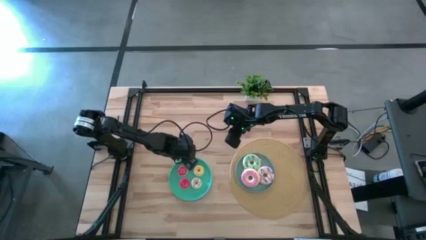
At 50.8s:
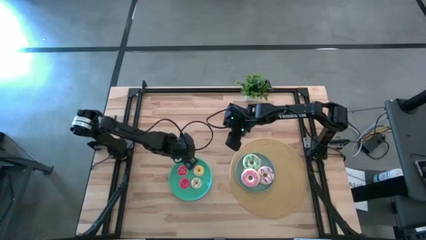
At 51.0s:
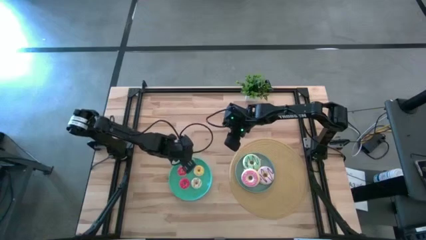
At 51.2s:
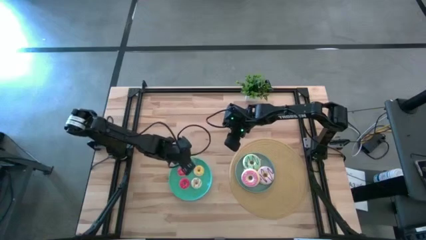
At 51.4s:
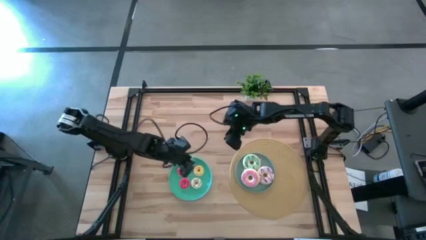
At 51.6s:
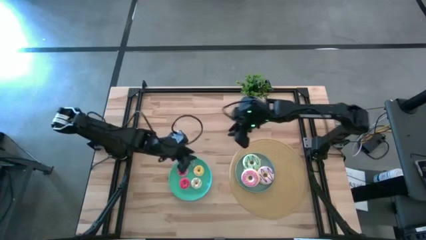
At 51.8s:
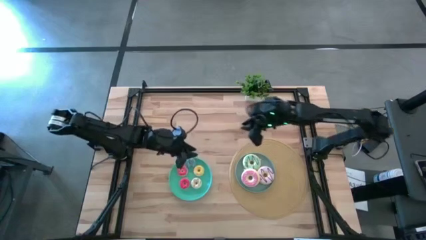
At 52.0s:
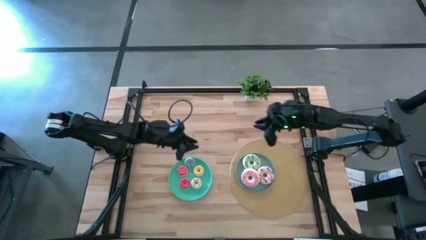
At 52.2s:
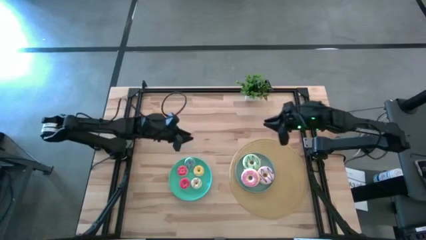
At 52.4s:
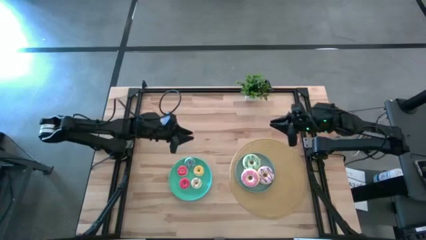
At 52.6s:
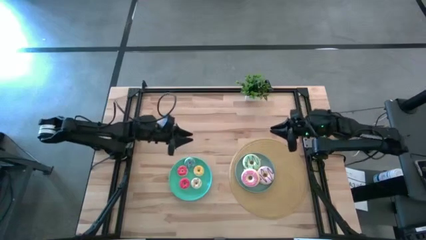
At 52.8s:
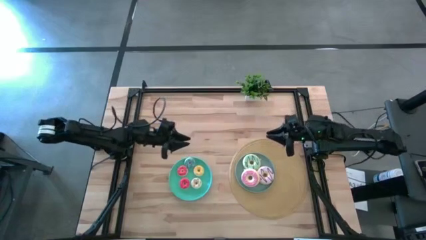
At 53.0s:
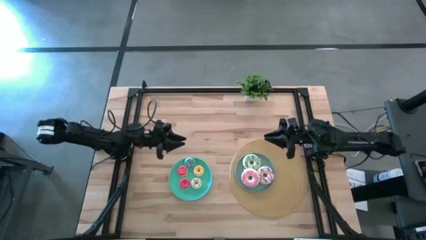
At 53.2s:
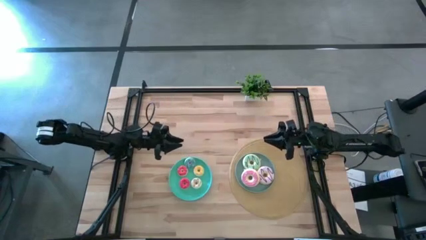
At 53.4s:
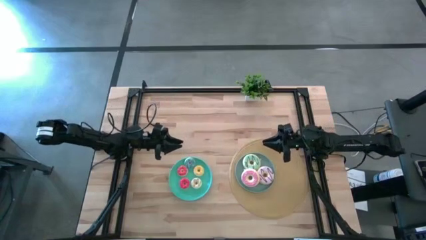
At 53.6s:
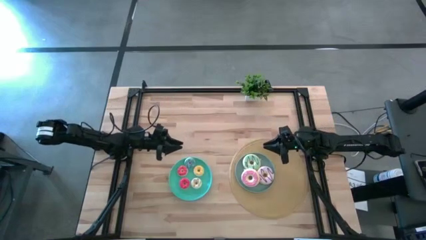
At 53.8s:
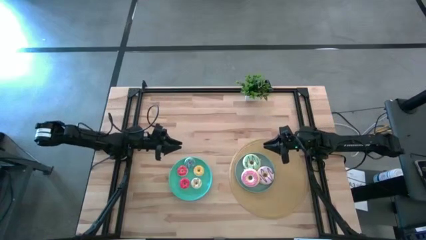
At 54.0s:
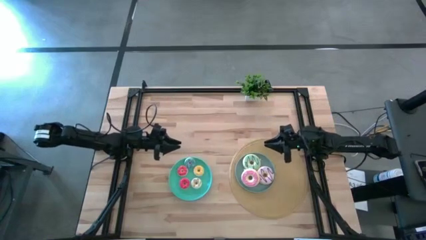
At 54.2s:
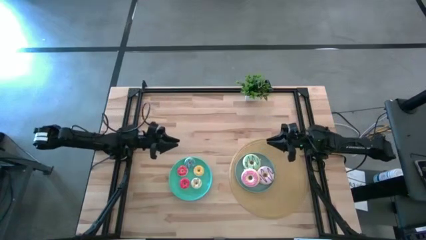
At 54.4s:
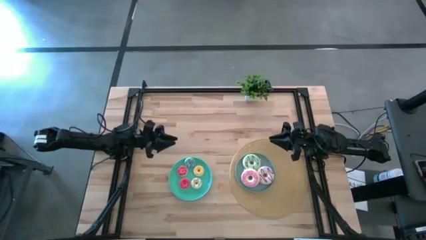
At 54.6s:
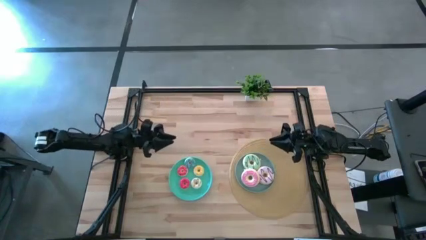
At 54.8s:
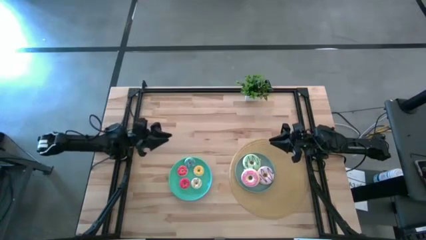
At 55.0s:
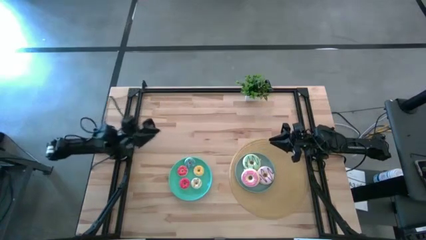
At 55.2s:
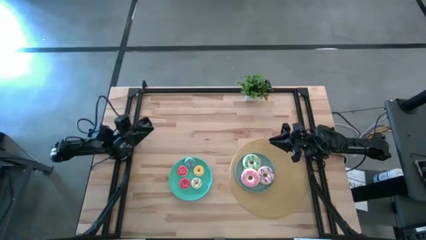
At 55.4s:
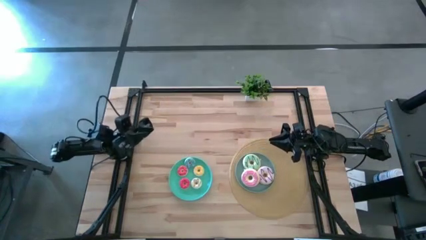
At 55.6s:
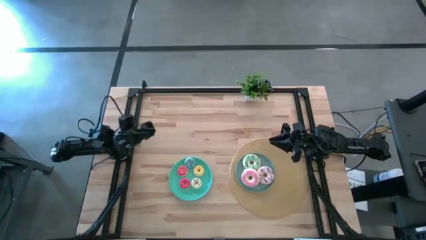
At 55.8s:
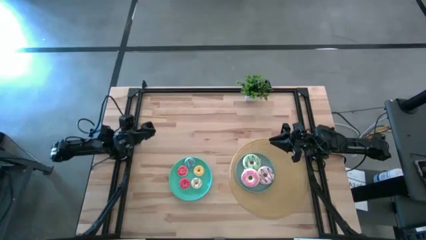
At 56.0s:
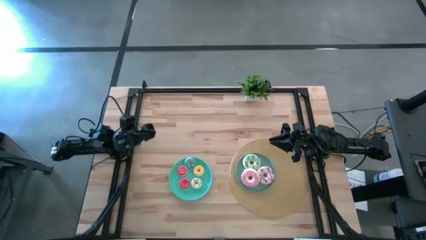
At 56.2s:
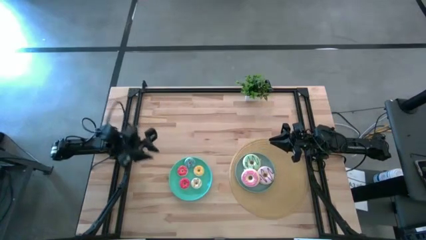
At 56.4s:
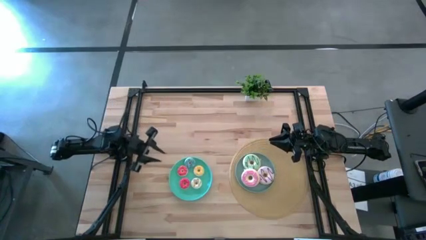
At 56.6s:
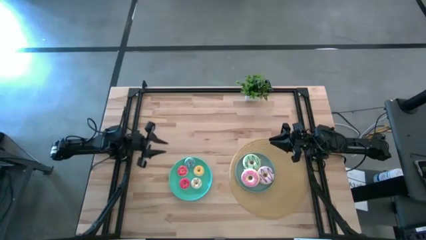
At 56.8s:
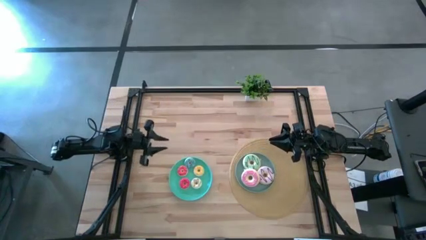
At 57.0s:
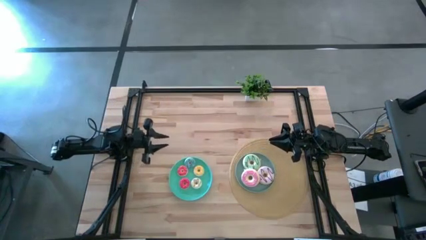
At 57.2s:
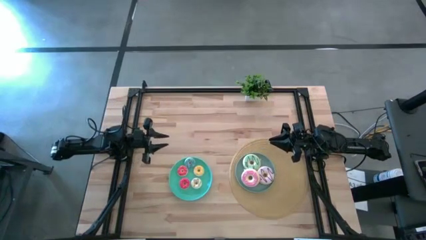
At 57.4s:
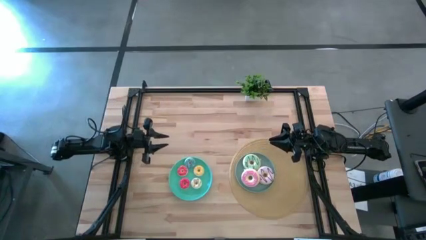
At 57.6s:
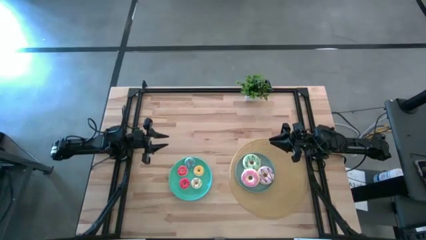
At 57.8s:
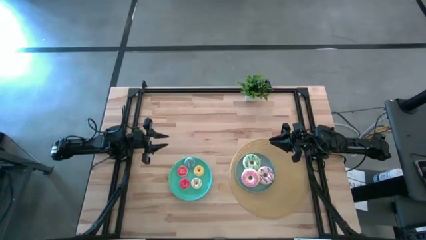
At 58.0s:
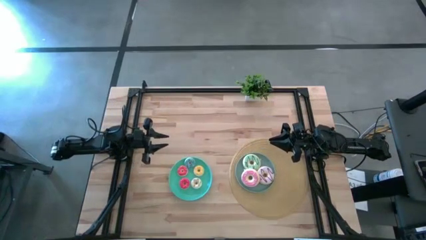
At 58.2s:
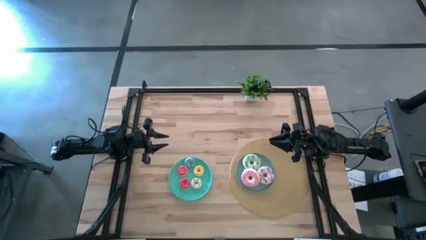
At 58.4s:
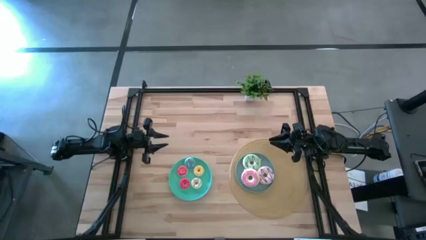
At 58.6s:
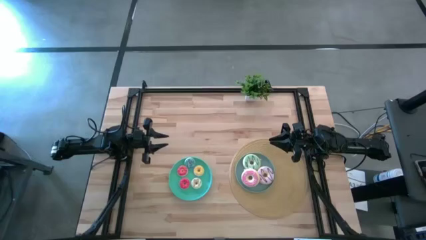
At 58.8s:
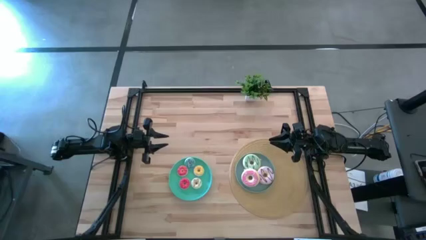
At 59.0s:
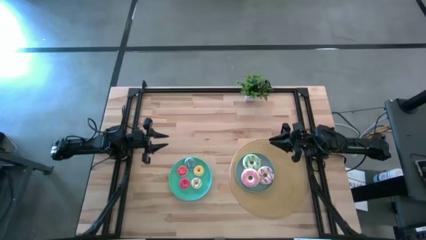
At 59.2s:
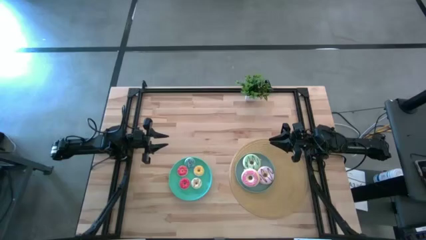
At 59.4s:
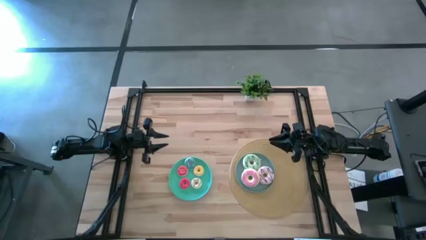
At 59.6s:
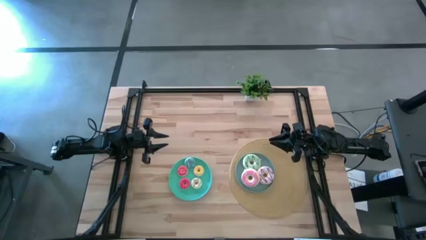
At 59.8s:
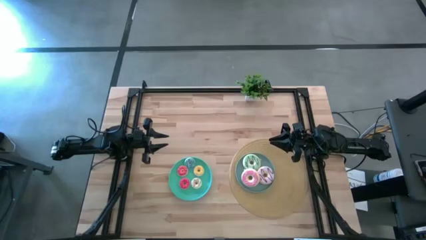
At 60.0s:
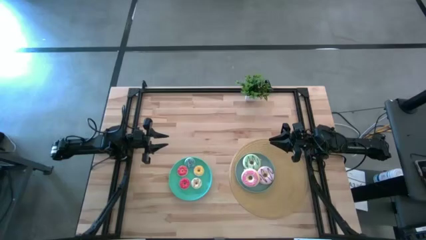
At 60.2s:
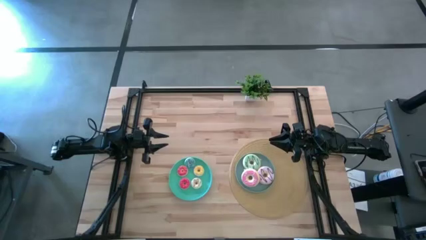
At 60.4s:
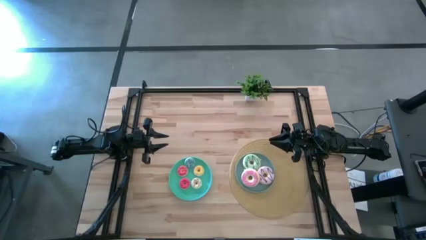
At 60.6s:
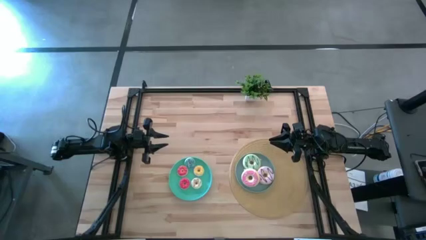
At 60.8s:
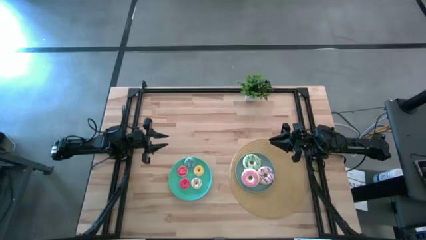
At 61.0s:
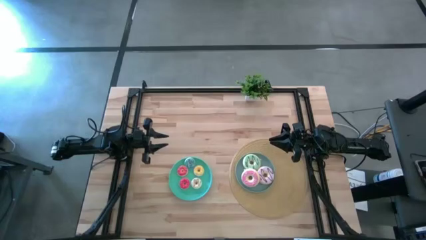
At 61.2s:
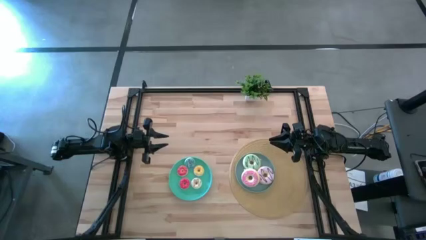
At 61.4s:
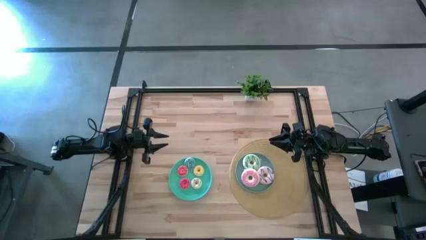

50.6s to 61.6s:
Task: Pick & Place donuts
Return to Home Position

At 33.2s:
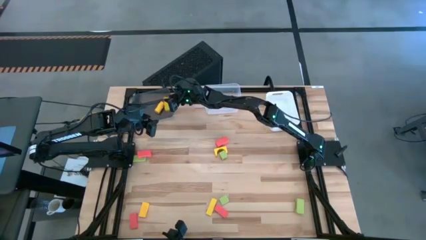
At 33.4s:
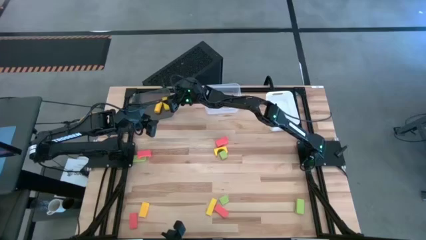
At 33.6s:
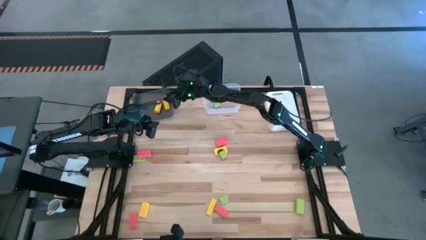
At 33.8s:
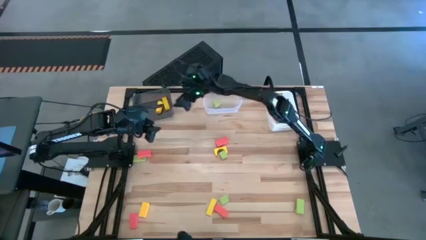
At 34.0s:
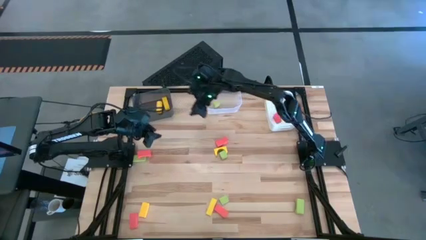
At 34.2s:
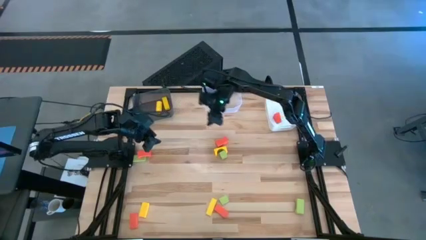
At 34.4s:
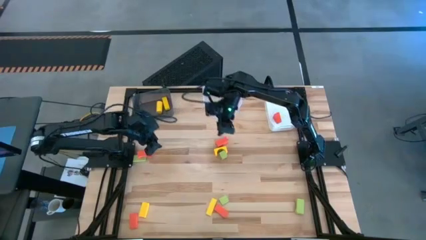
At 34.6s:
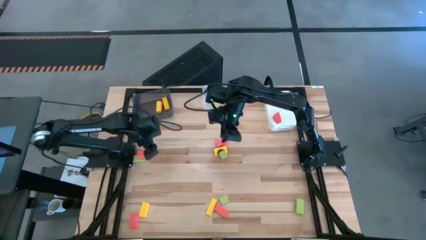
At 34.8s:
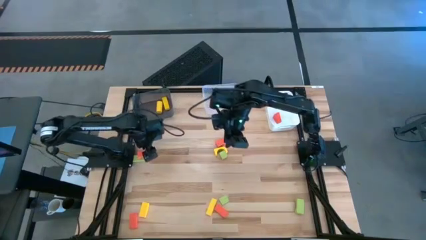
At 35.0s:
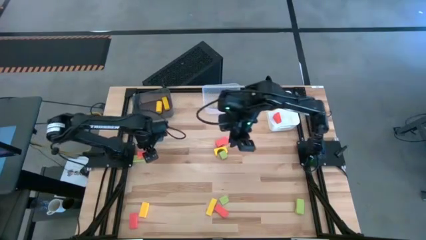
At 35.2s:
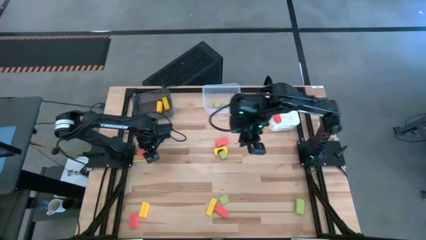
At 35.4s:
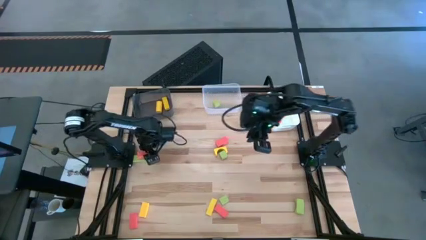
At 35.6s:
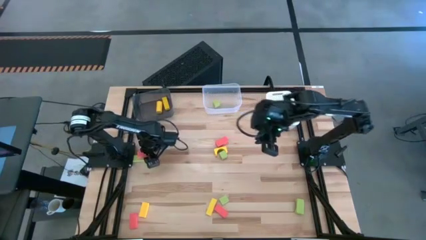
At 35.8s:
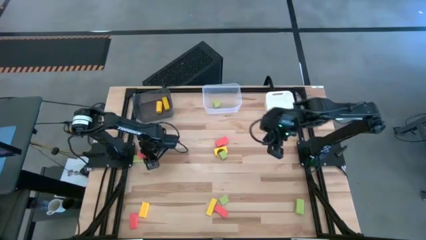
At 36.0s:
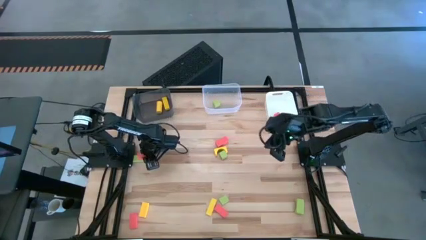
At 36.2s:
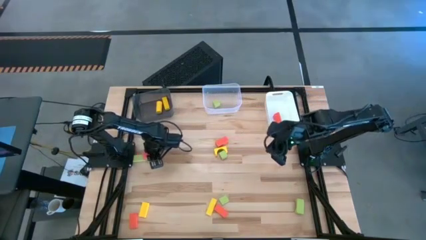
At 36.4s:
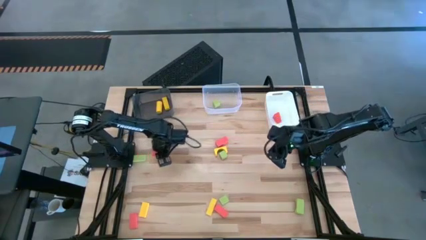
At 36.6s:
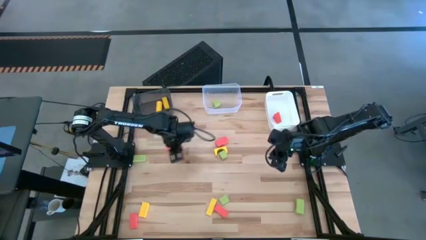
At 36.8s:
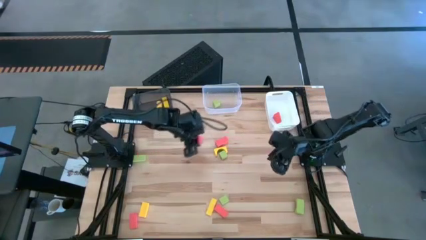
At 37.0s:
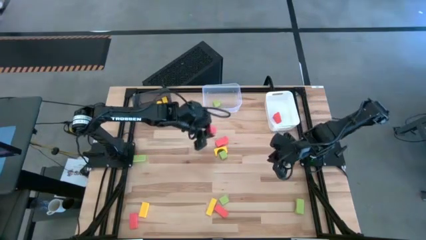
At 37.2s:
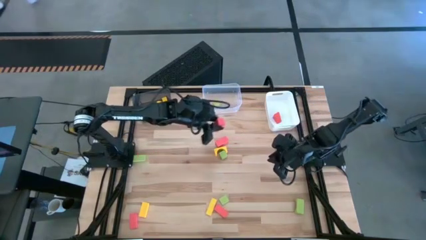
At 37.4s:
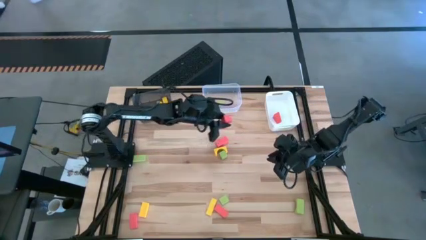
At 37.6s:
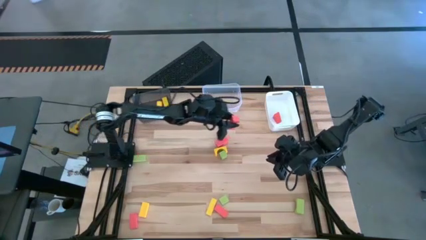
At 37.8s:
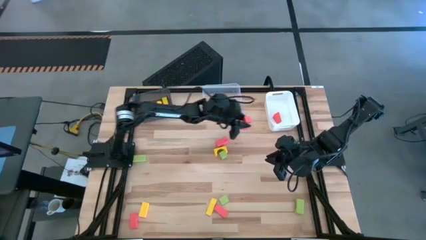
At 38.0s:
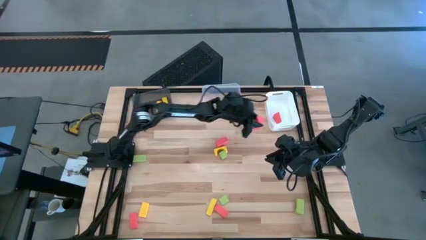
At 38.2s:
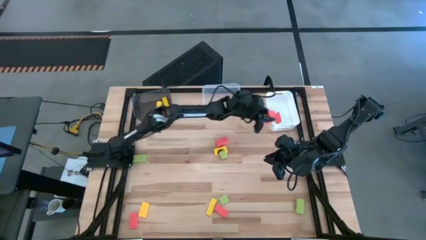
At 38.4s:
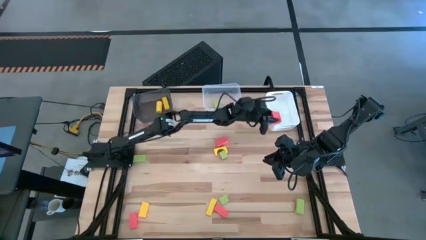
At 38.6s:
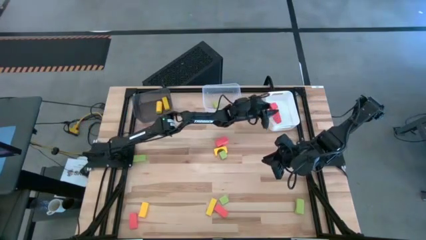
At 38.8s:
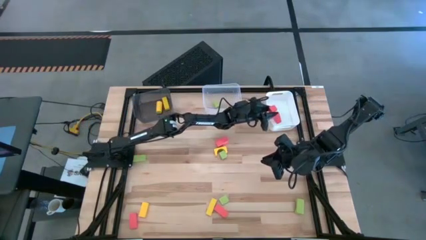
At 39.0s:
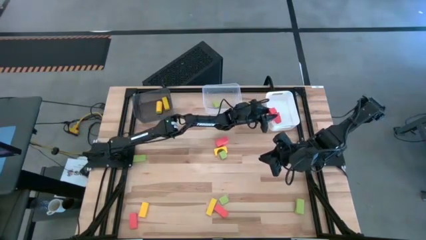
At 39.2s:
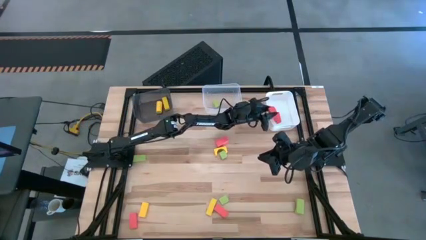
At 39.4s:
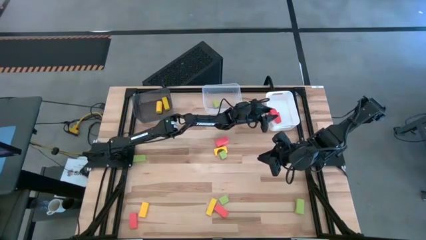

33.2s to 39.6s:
Task: Sort & place blocks by color
Put the orange block into the white bin
